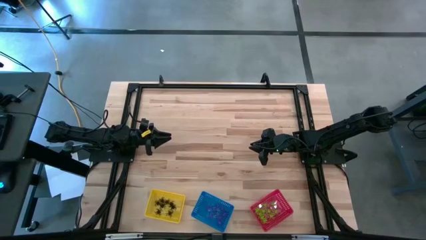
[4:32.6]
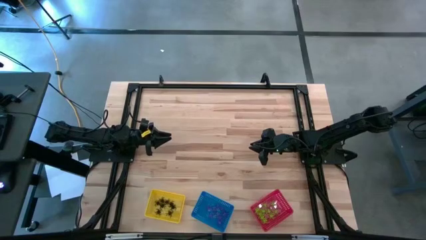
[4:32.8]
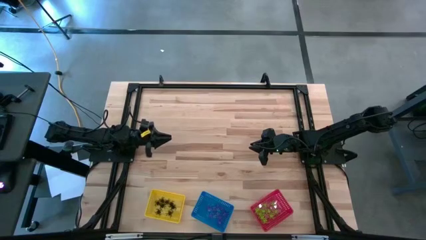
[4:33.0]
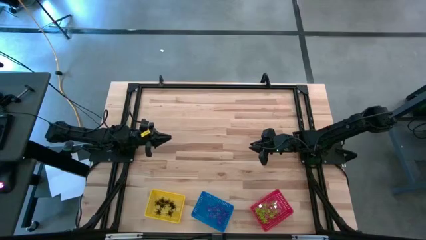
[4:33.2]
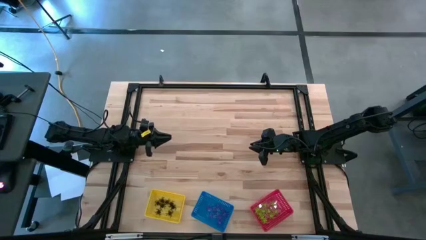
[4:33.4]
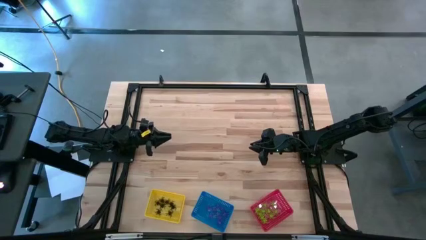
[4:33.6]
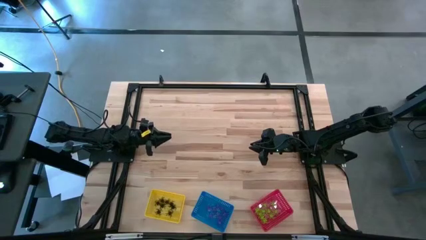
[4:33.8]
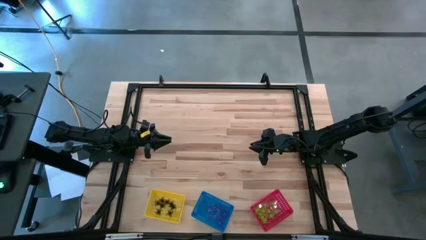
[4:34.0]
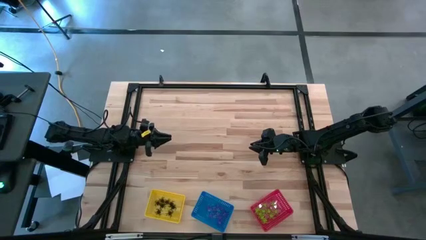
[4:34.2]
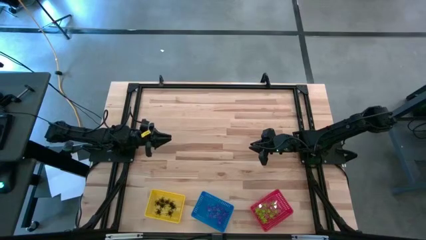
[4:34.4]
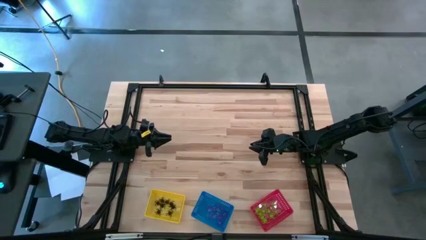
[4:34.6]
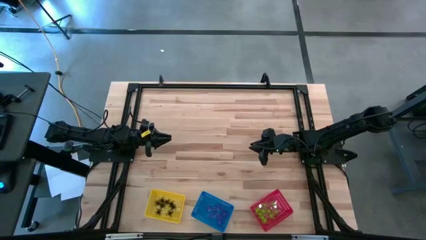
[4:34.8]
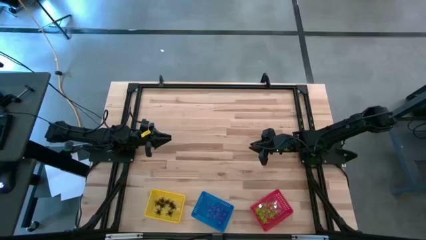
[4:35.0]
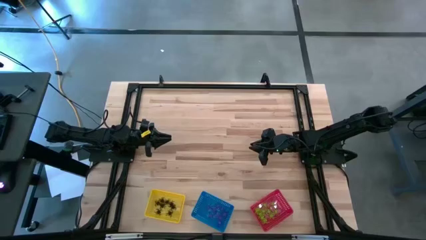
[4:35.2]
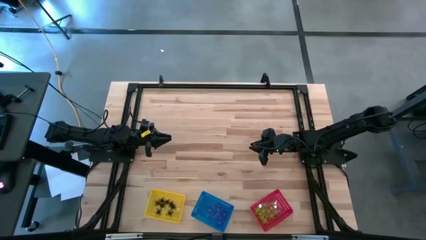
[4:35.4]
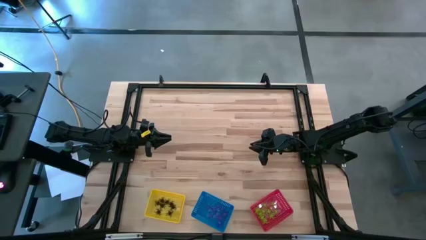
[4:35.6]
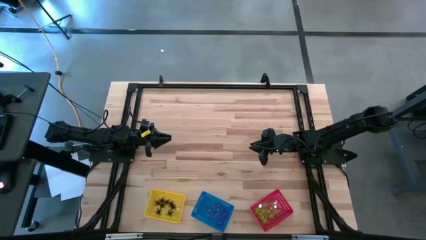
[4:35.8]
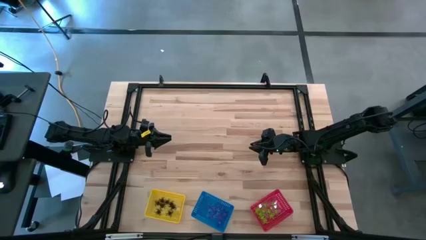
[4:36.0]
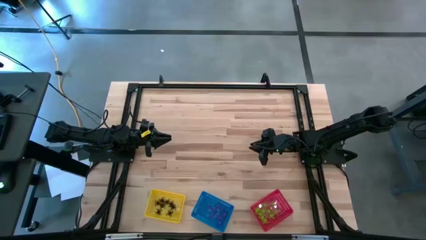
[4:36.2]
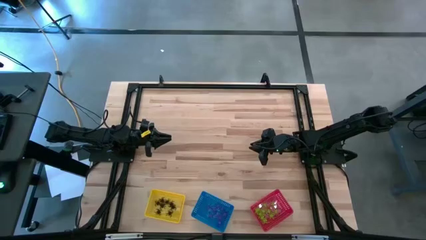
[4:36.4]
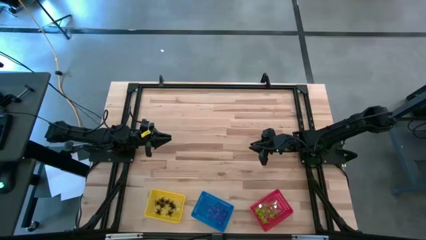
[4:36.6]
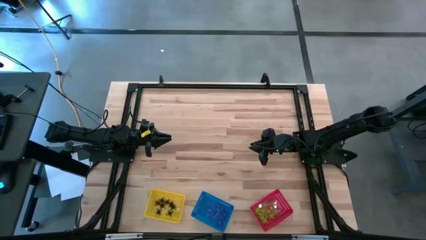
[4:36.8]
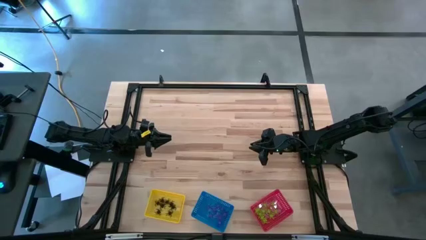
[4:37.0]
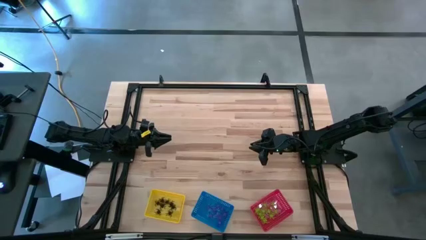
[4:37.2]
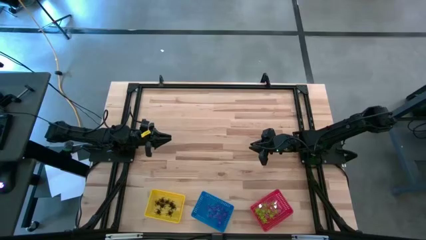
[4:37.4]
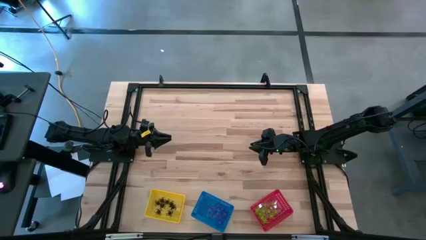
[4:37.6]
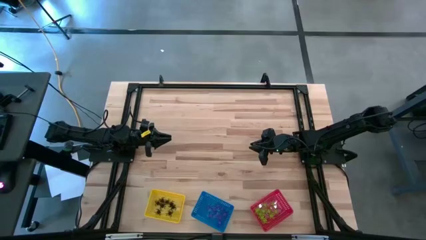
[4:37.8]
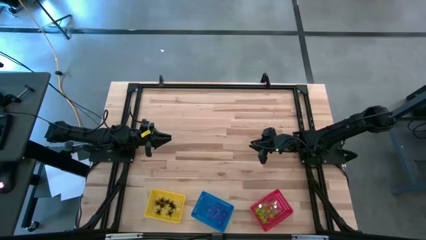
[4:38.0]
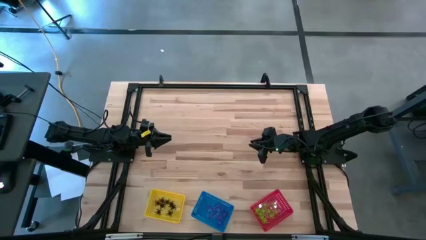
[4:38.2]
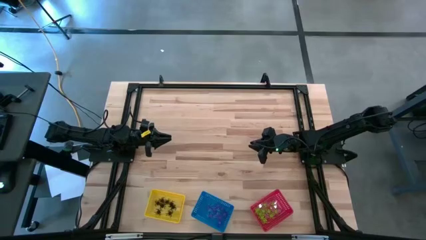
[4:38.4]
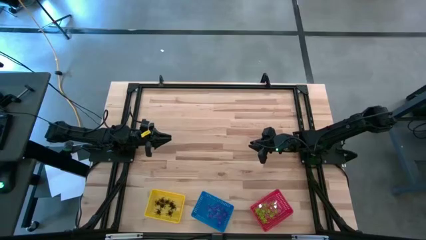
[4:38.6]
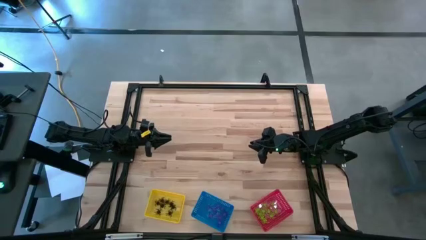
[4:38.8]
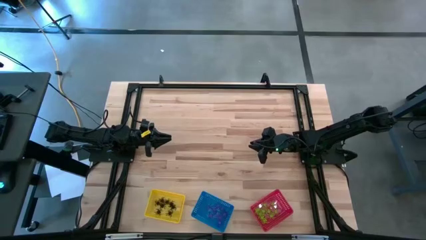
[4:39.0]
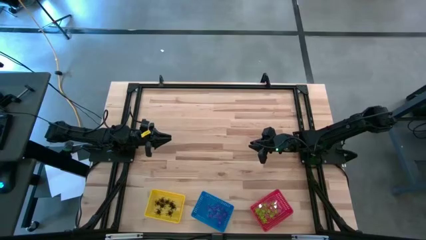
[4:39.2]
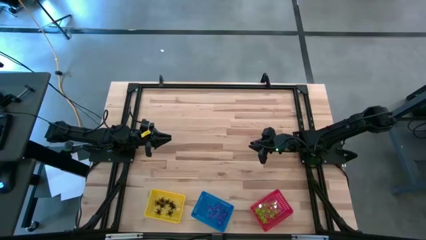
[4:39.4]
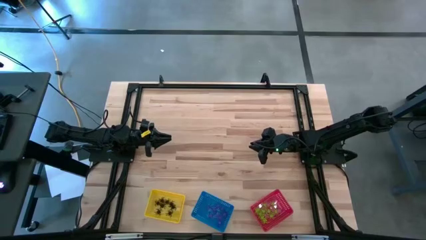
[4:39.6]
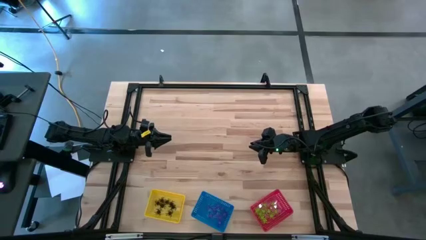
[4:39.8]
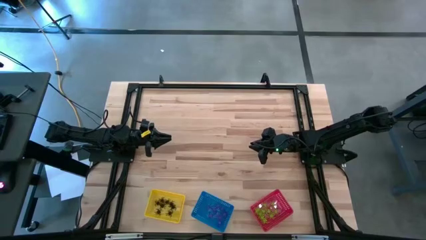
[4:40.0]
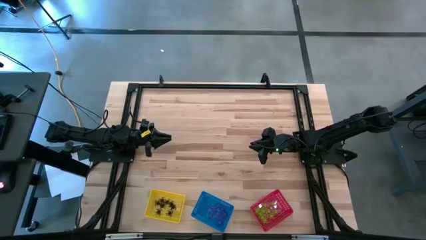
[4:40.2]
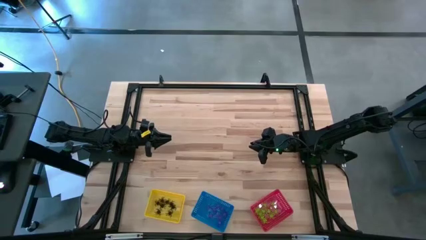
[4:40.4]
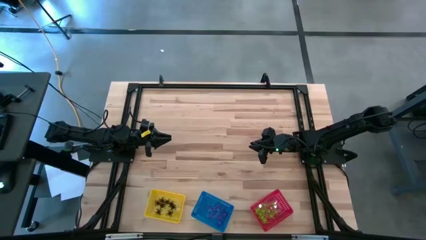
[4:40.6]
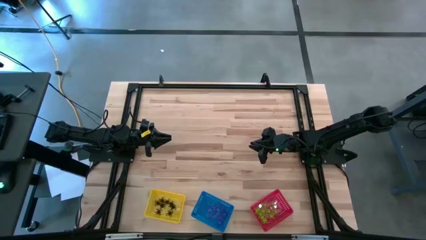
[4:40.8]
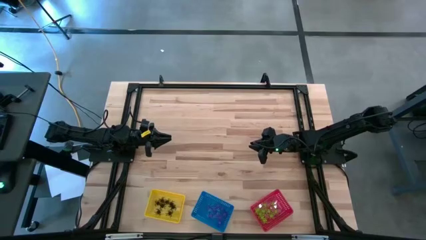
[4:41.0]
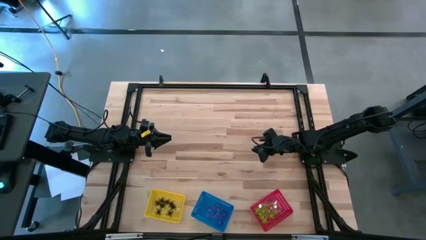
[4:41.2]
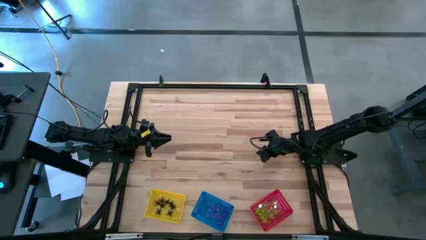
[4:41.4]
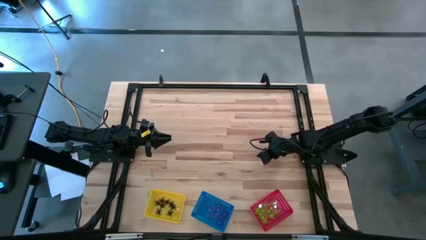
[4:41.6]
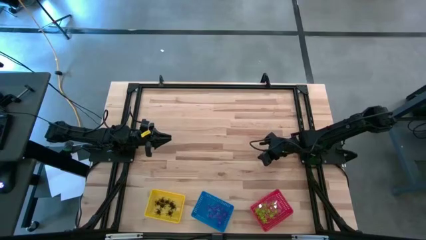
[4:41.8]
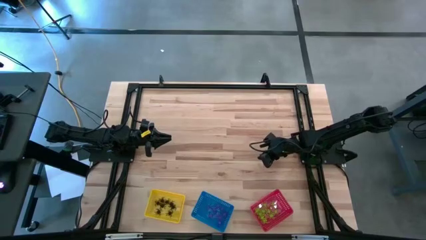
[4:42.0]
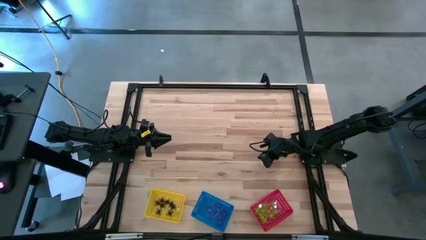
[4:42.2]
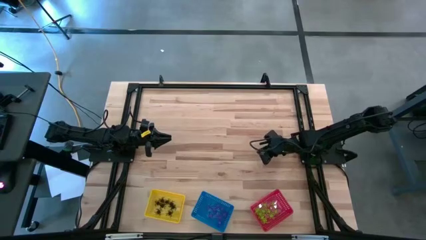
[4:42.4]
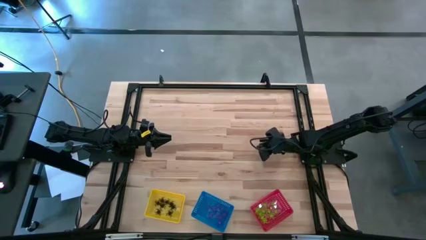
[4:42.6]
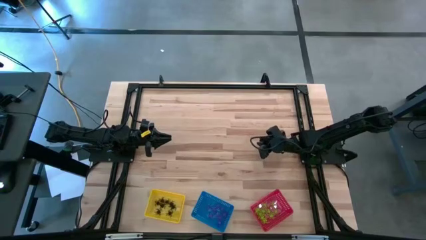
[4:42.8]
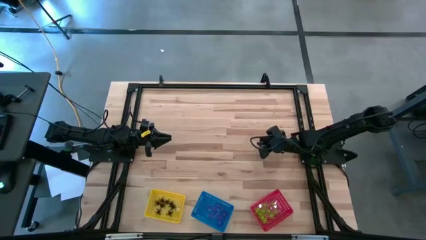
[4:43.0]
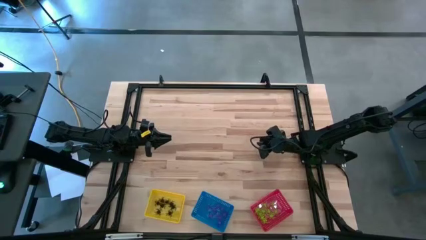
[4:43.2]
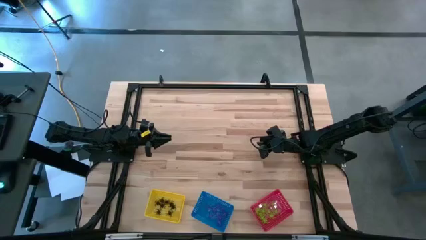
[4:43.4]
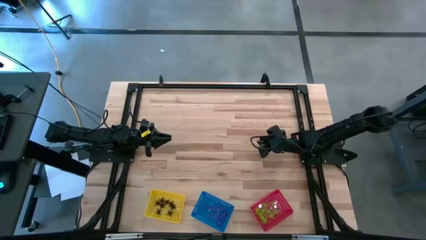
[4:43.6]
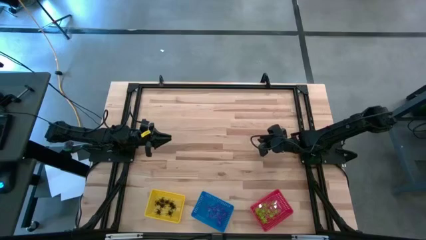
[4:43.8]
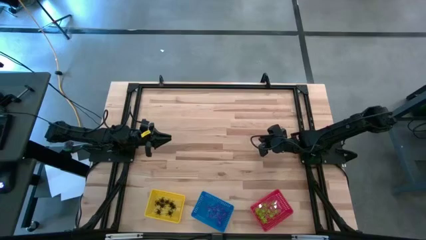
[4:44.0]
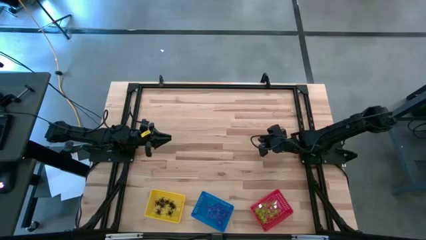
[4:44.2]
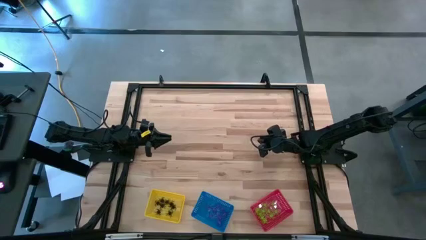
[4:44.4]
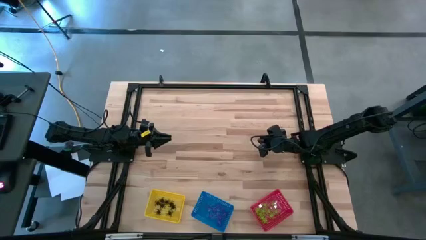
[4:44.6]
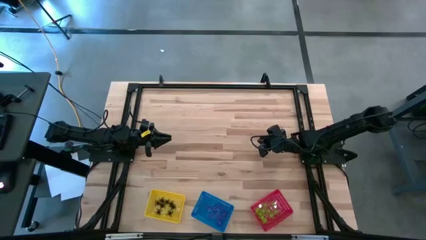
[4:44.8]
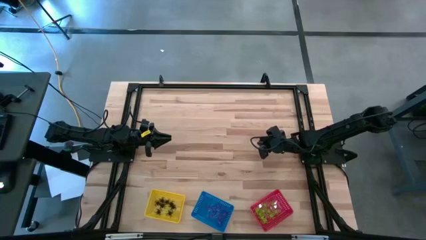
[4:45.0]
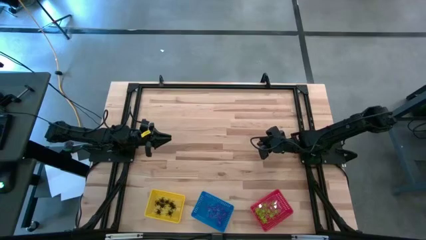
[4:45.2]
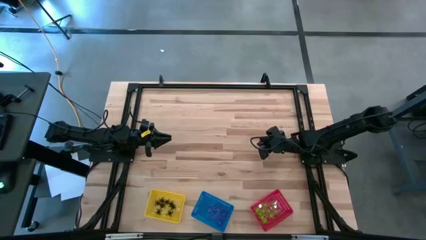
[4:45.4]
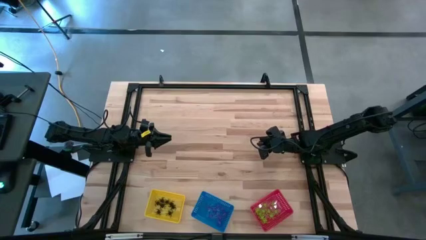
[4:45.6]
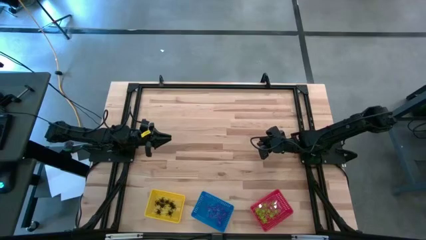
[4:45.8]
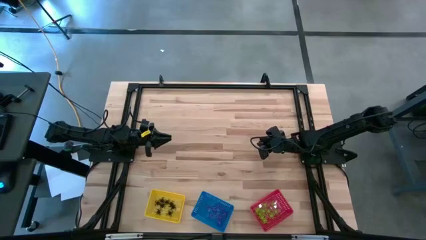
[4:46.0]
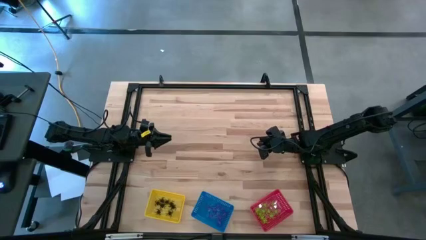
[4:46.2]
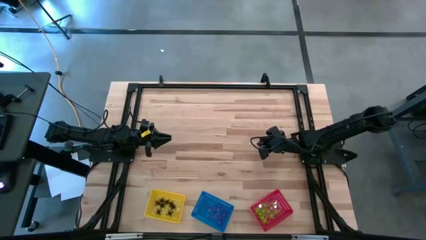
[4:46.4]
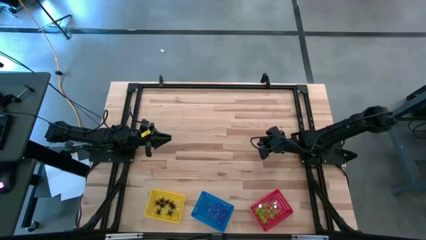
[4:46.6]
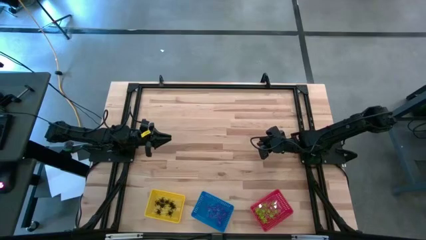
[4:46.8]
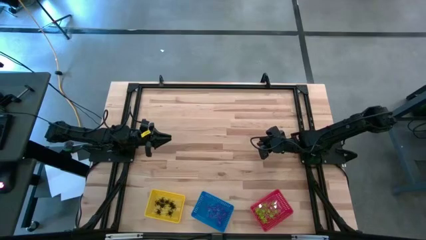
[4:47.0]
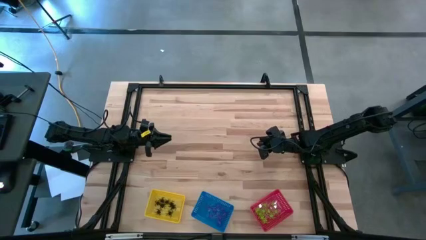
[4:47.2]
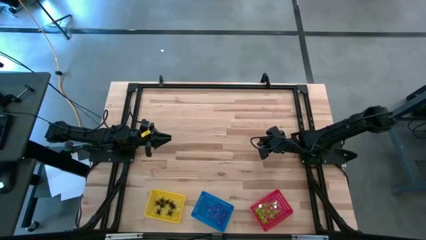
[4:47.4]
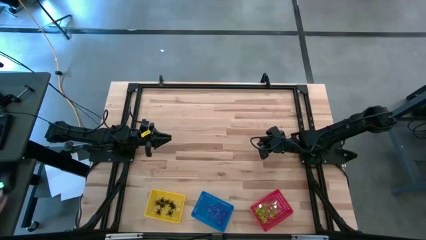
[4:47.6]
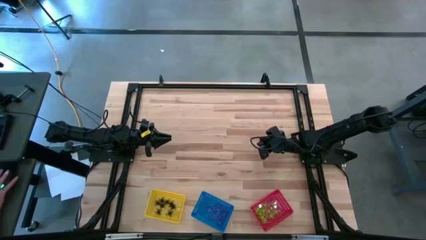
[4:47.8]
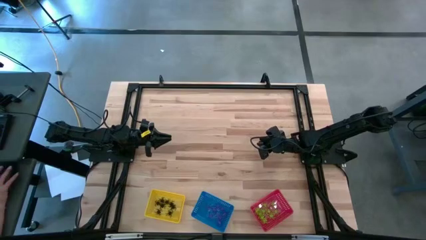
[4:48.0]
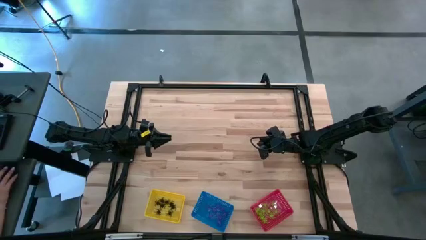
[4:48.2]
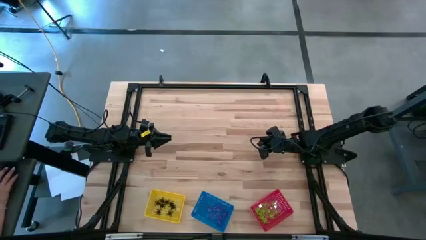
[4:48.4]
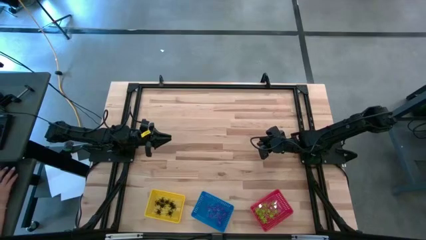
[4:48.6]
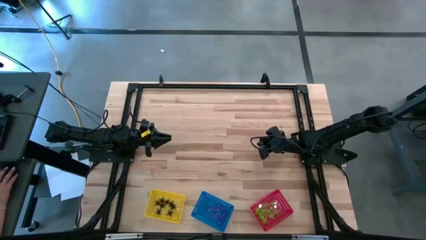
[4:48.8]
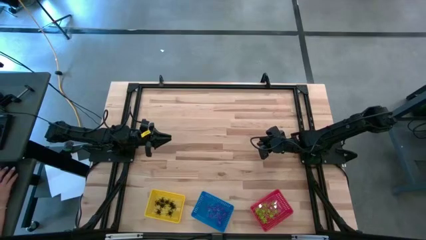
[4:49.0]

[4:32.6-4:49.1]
Task: Sort Halloween decoration
Return to Home Position
